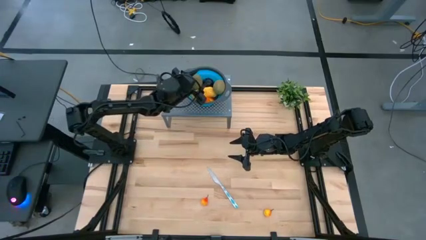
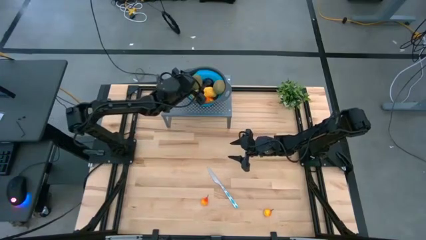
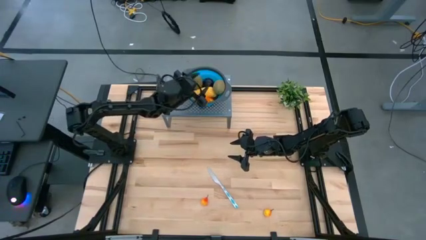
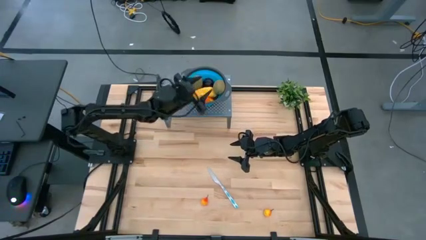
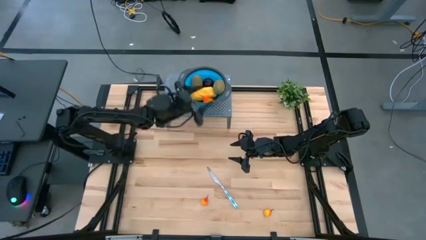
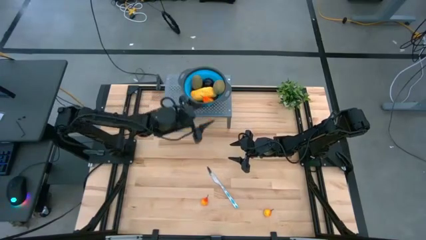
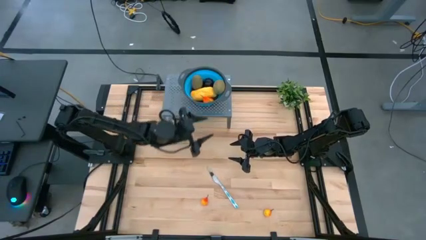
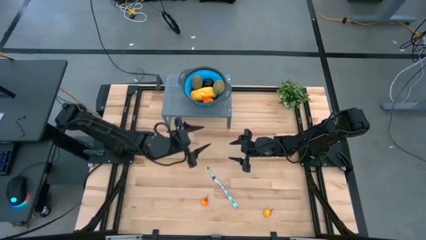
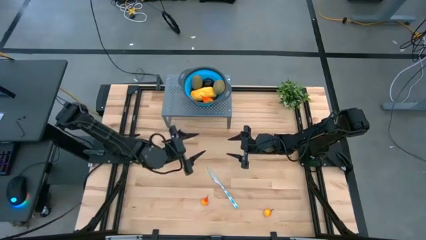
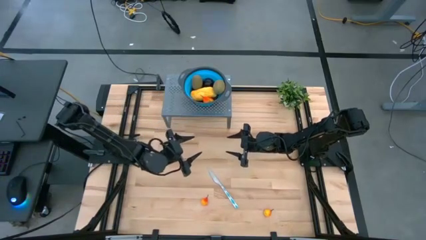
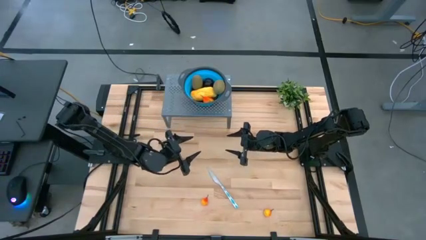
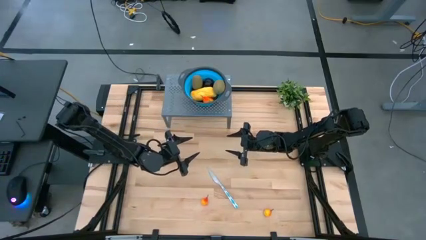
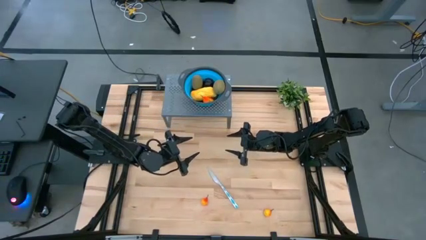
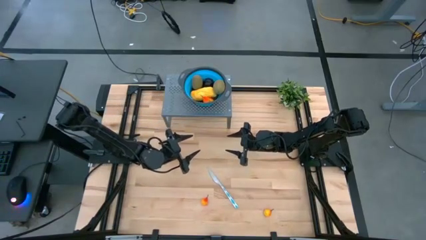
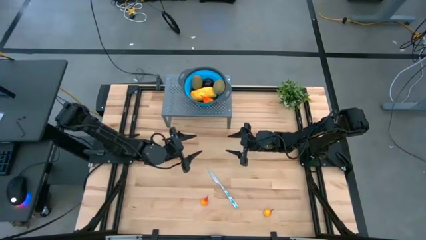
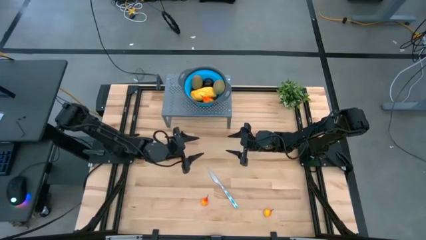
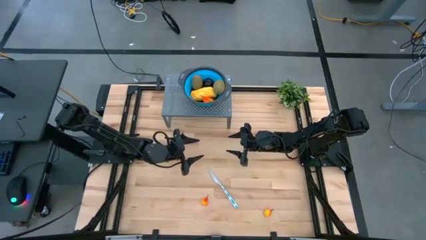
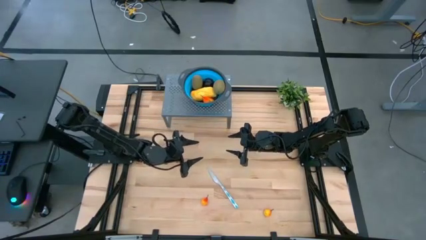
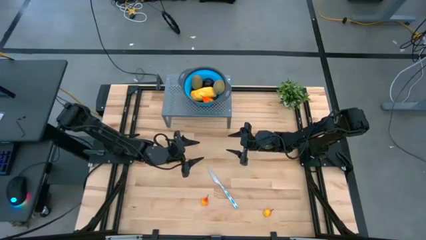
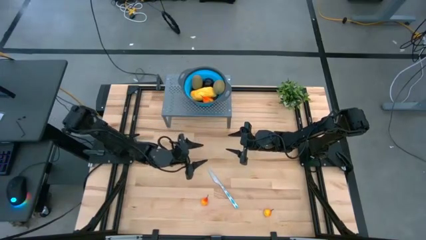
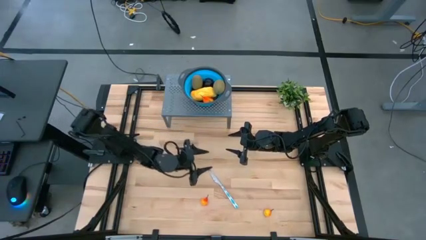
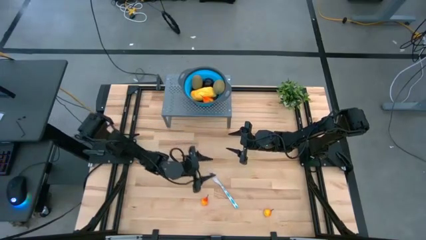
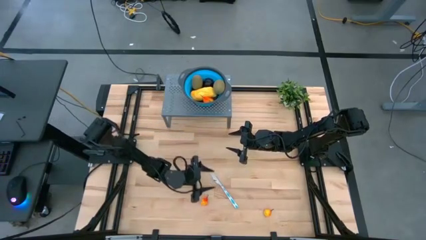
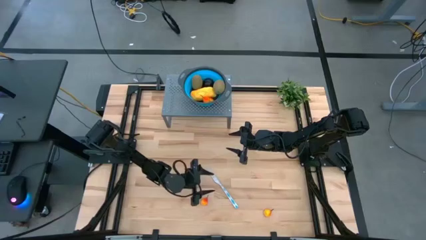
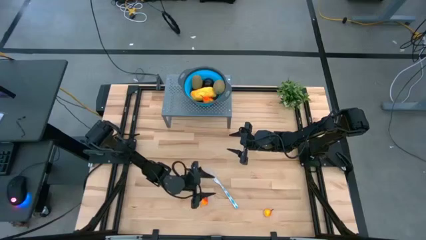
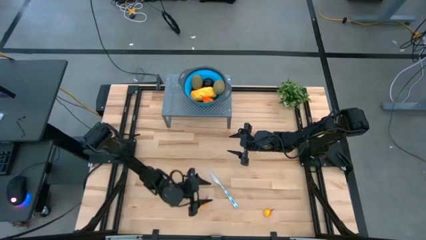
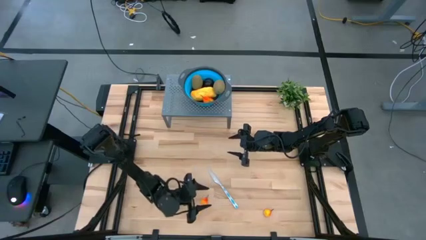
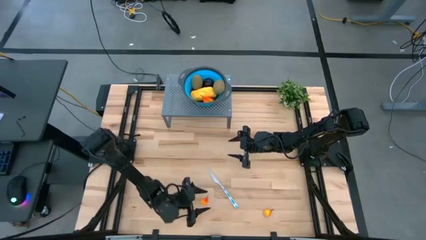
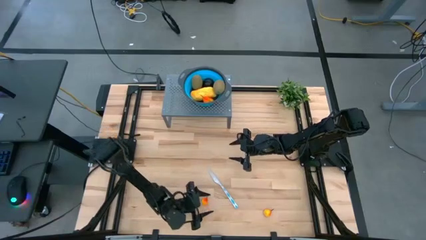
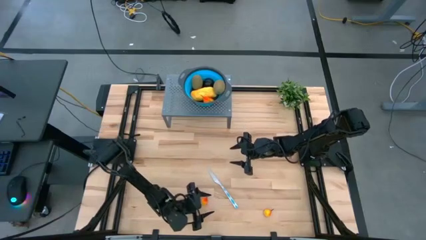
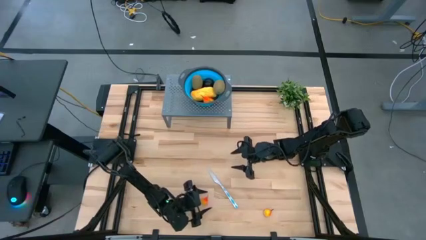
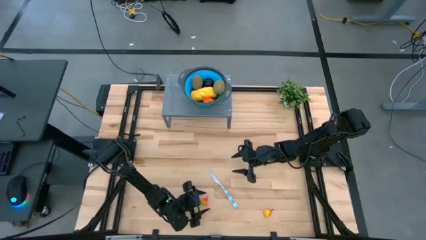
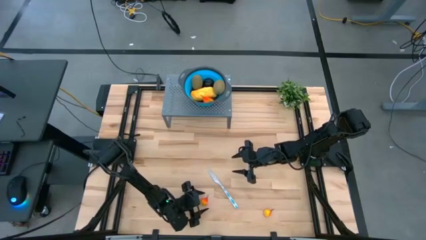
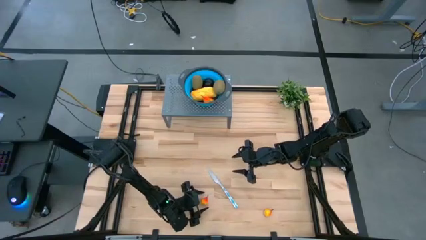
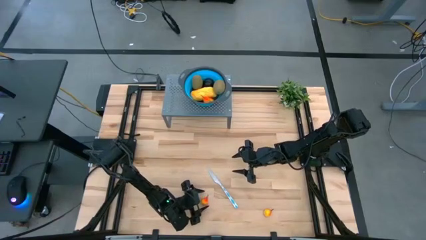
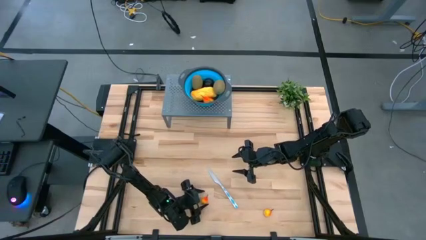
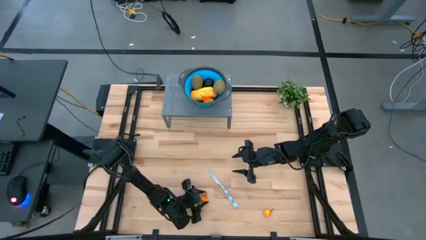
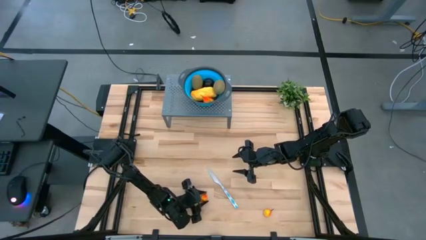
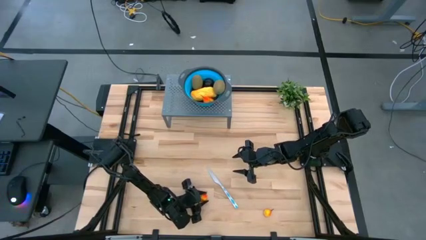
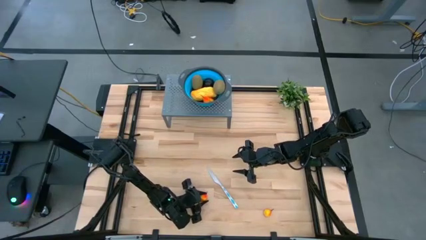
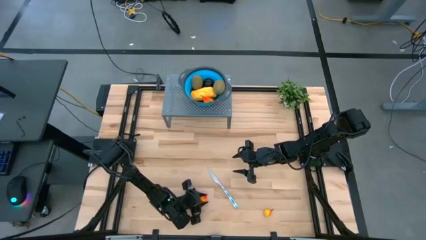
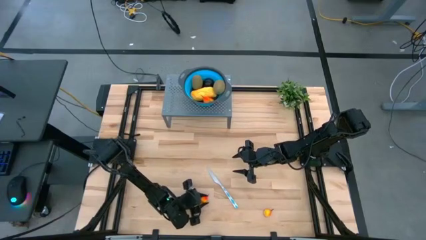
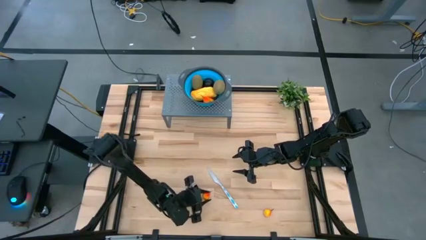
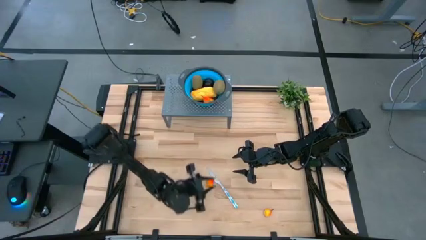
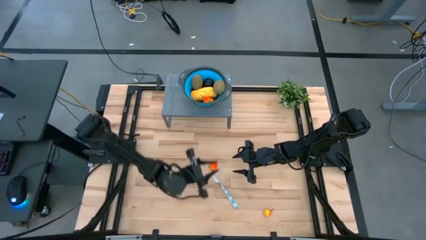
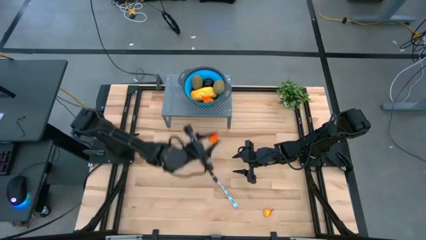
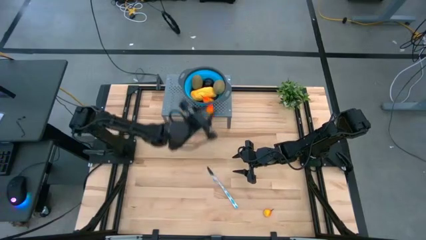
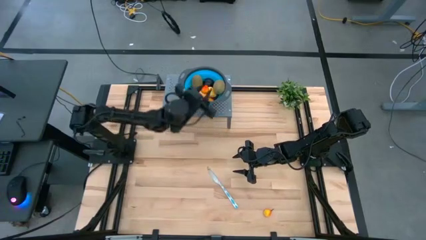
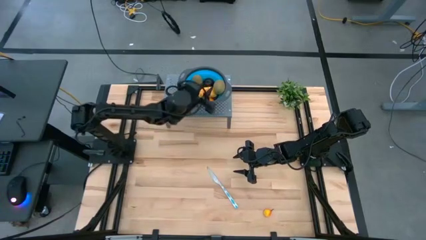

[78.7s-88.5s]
Task: Pick & Place Fruit
Put the orange pear into the blue strainer bowl on the shelf

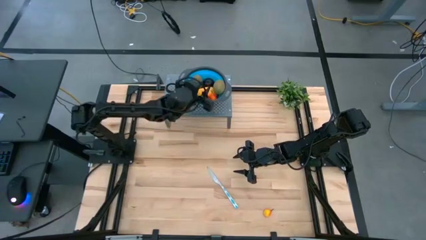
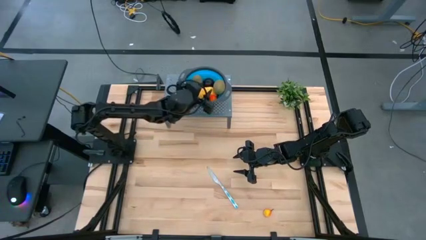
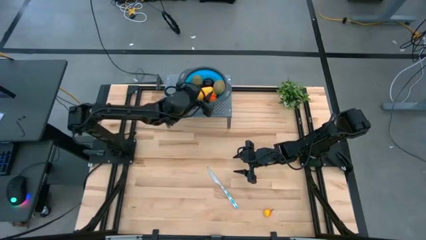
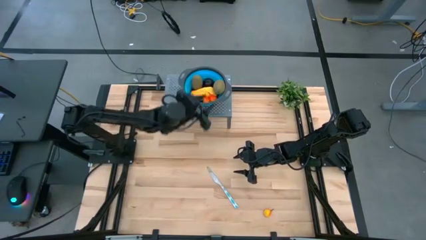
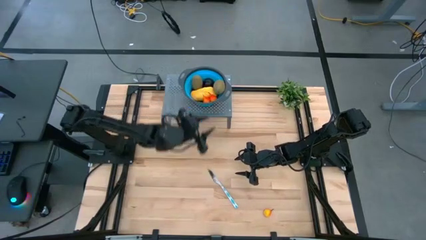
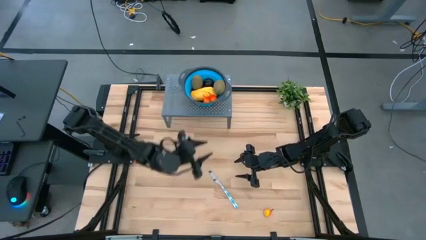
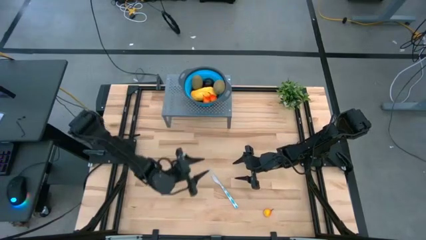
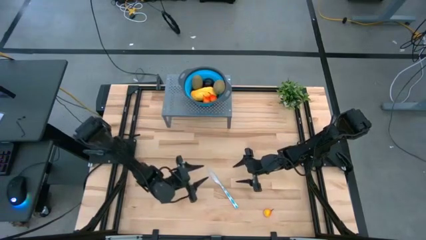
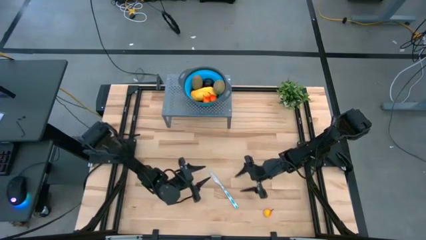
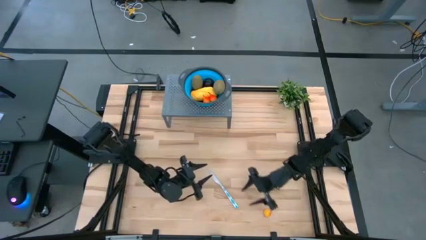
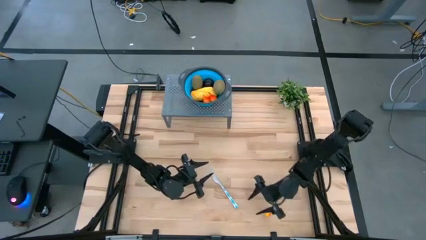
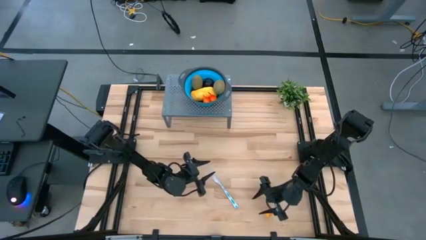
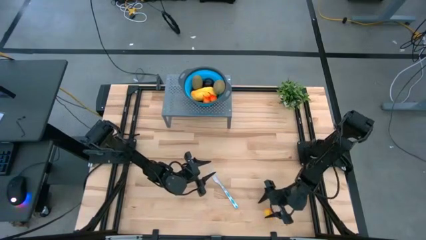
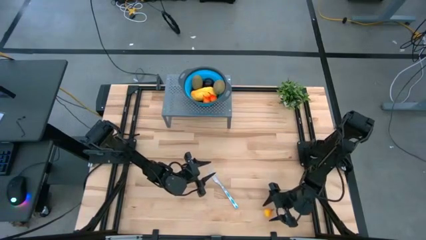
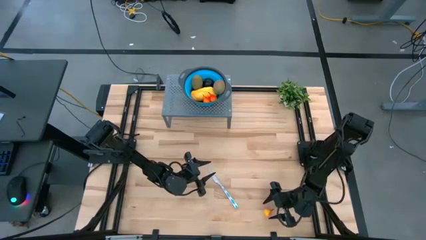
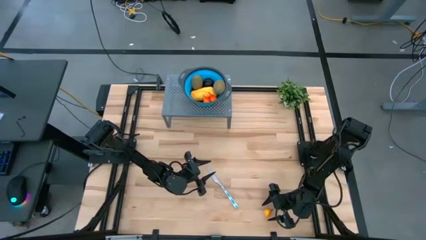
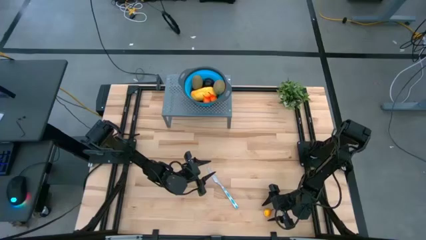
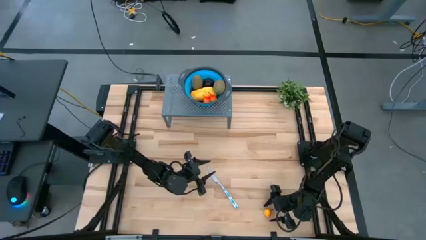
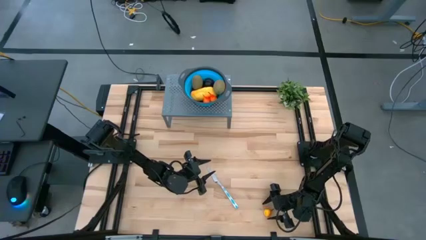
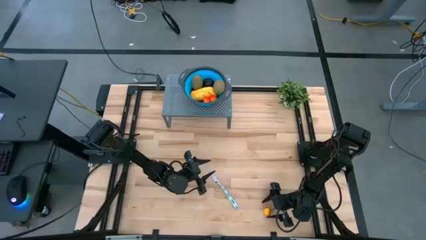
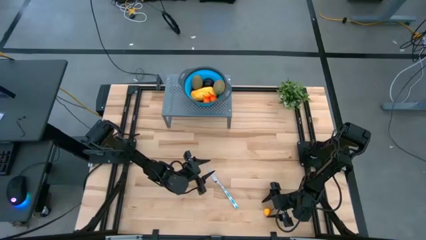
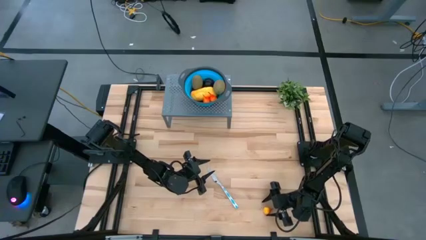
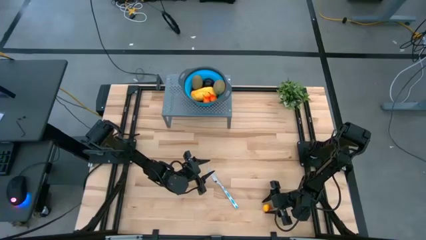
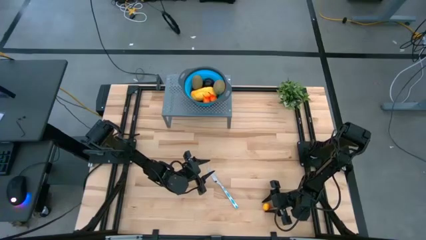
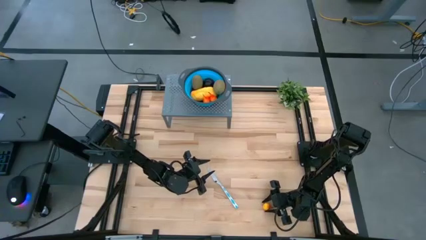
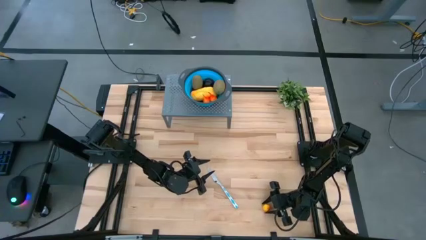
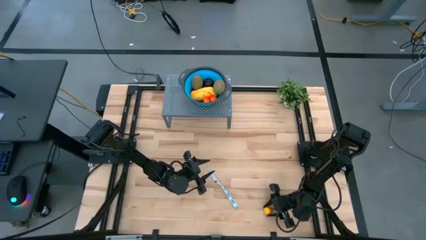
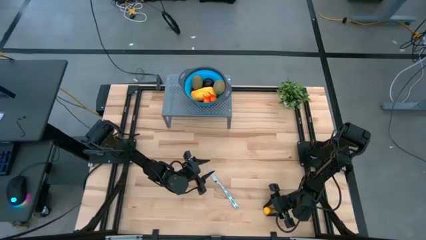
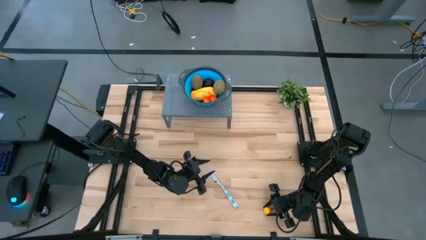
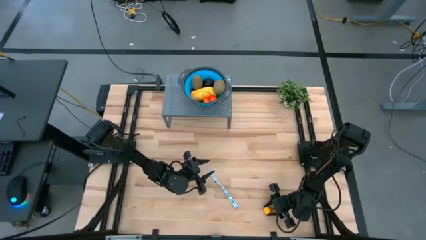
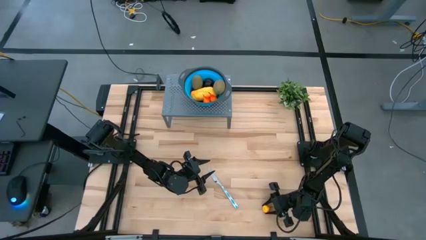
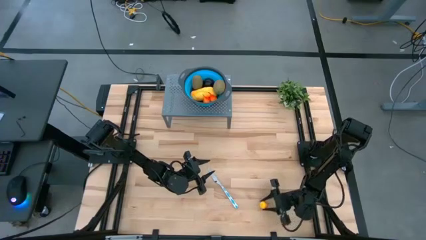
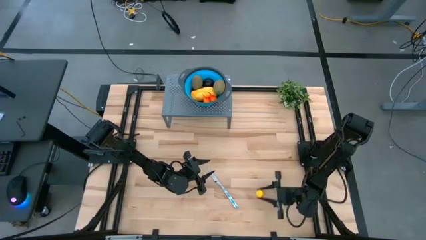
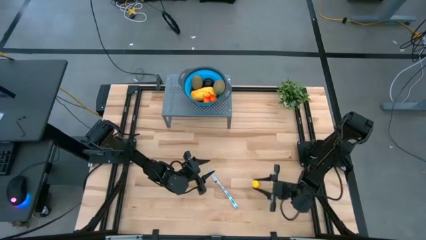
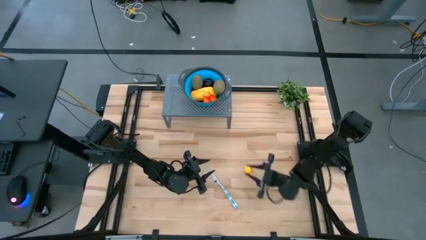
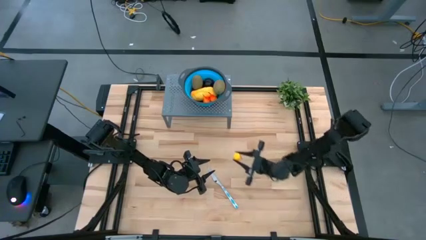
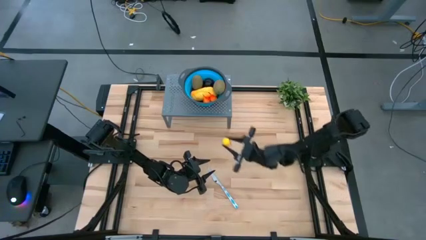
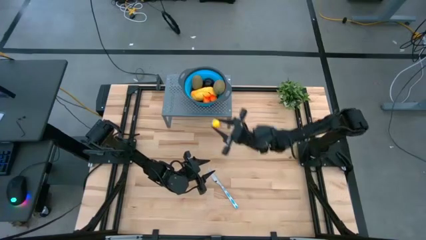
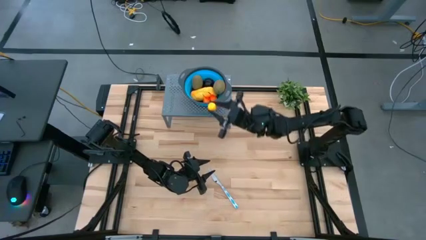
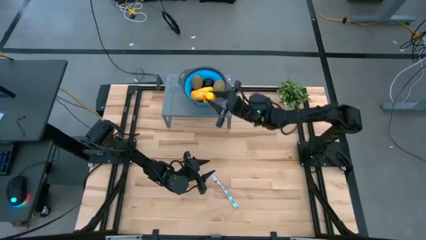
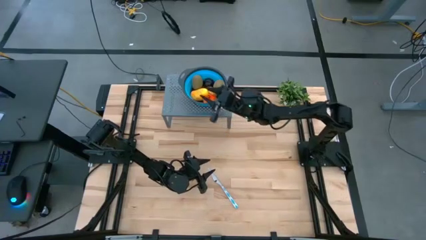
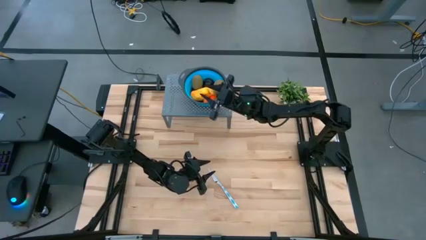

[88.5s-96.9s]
Put the orange pear into the blue strainer bowl on the shelf
